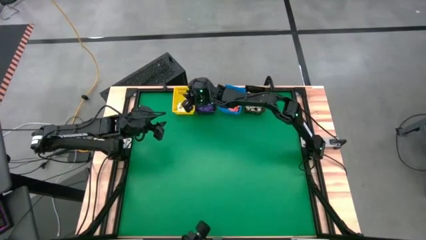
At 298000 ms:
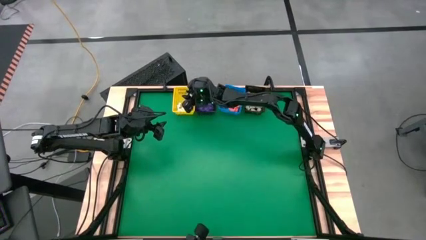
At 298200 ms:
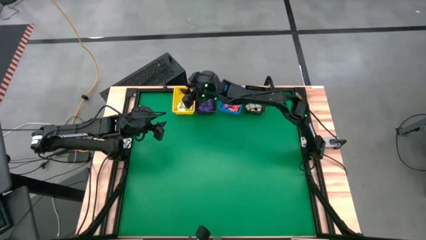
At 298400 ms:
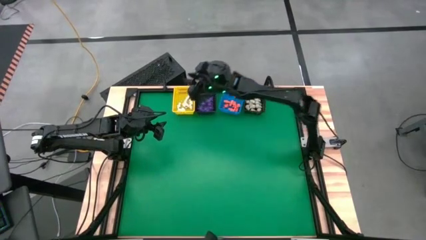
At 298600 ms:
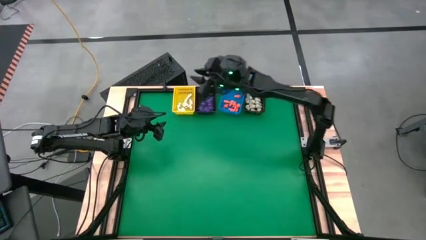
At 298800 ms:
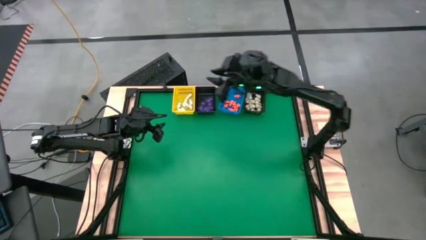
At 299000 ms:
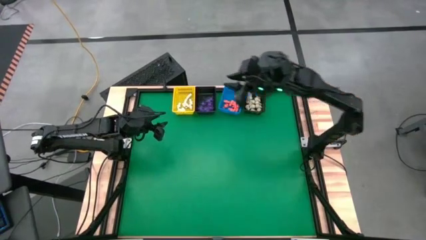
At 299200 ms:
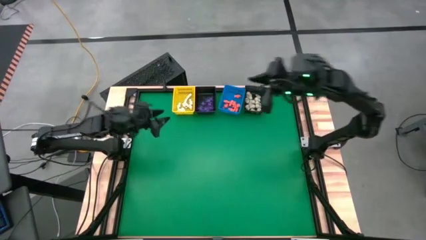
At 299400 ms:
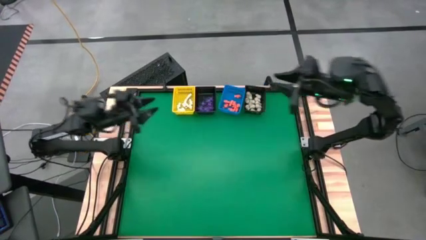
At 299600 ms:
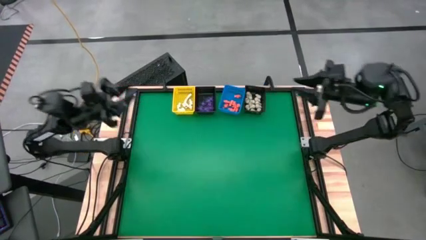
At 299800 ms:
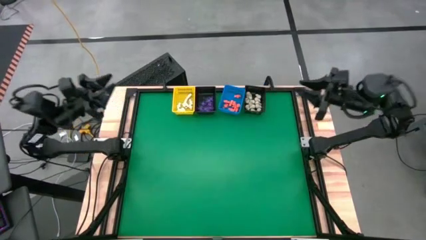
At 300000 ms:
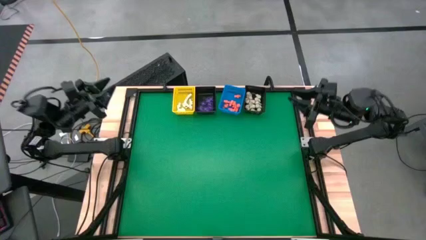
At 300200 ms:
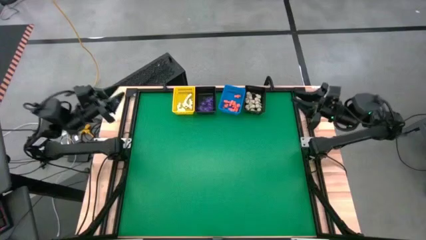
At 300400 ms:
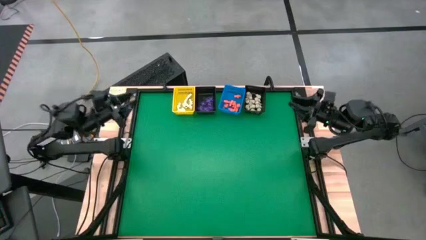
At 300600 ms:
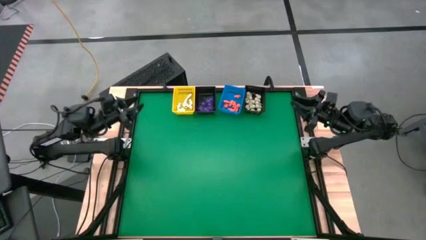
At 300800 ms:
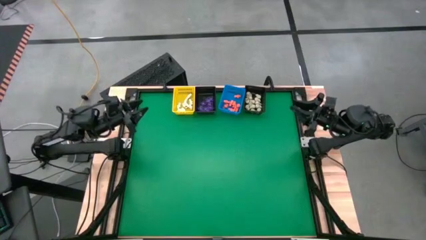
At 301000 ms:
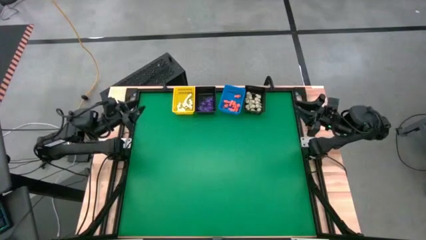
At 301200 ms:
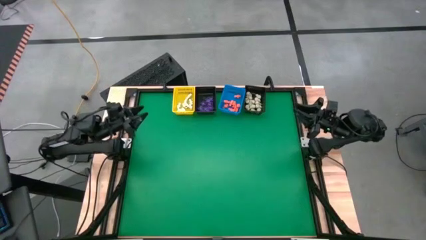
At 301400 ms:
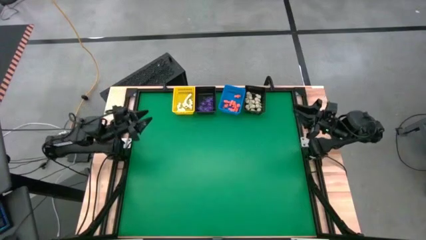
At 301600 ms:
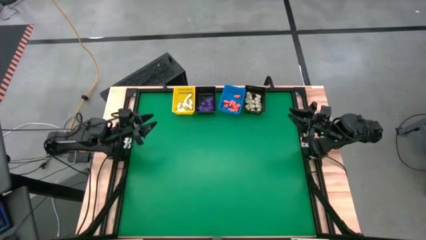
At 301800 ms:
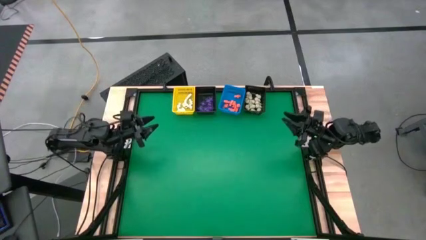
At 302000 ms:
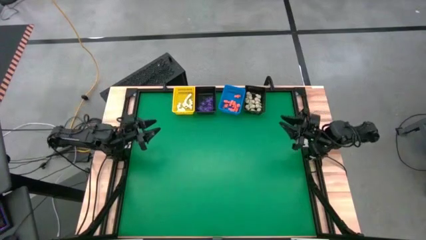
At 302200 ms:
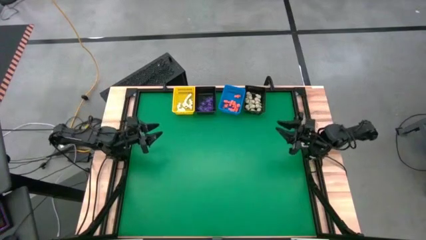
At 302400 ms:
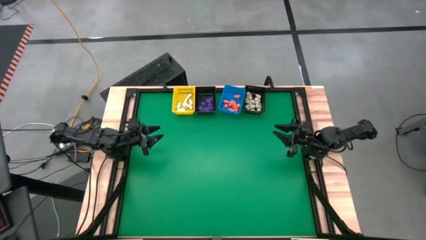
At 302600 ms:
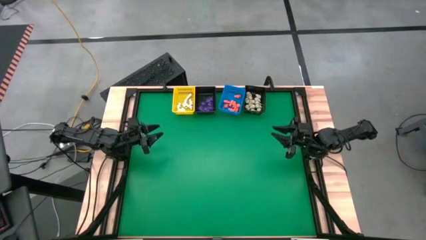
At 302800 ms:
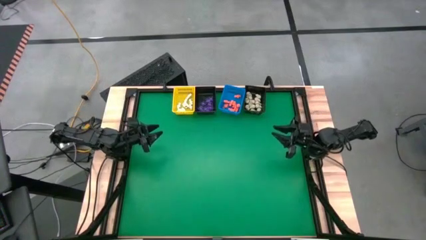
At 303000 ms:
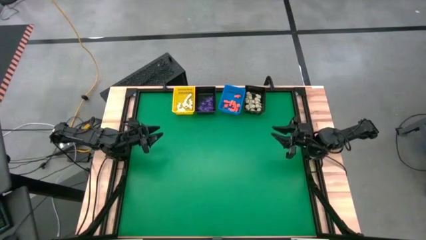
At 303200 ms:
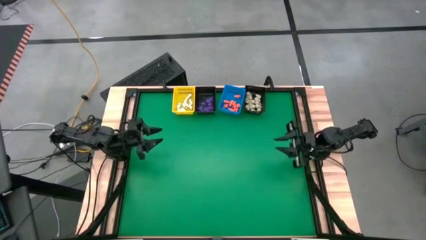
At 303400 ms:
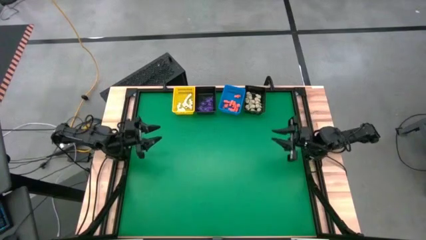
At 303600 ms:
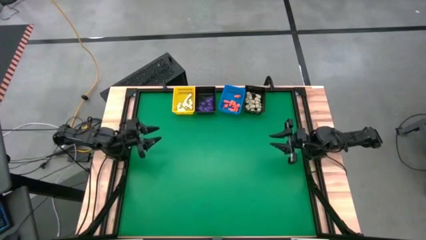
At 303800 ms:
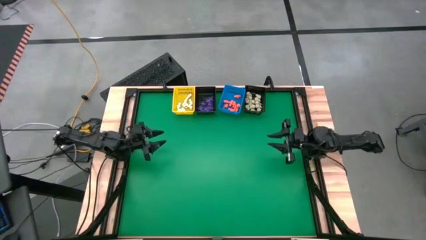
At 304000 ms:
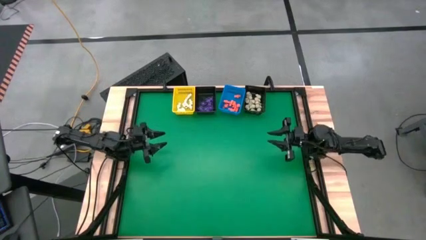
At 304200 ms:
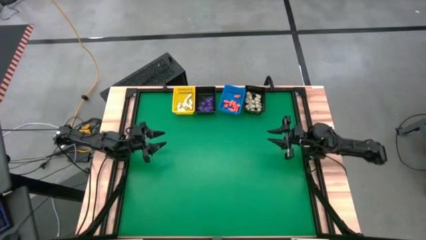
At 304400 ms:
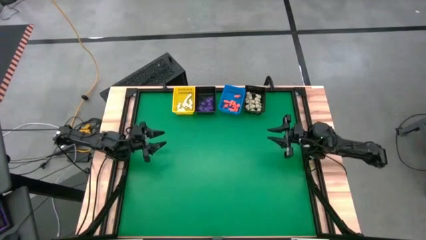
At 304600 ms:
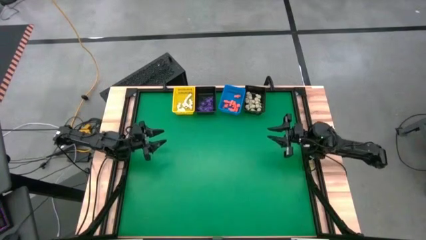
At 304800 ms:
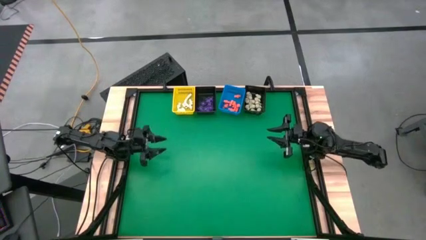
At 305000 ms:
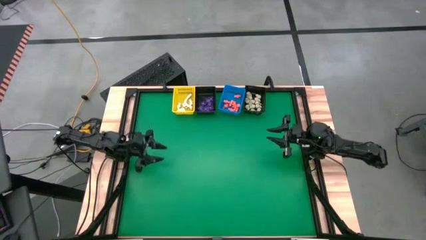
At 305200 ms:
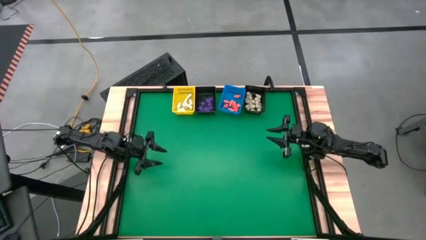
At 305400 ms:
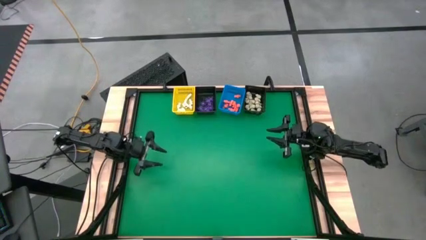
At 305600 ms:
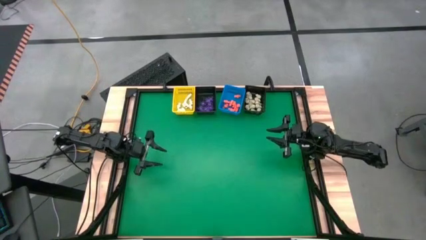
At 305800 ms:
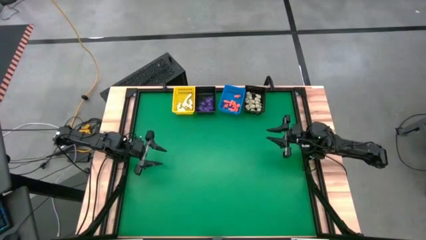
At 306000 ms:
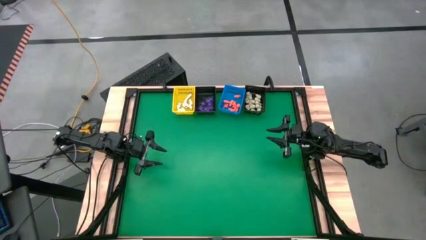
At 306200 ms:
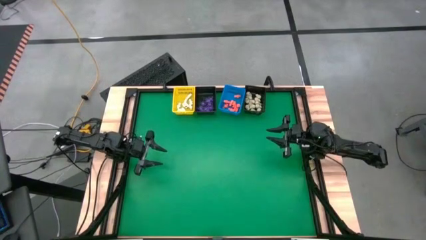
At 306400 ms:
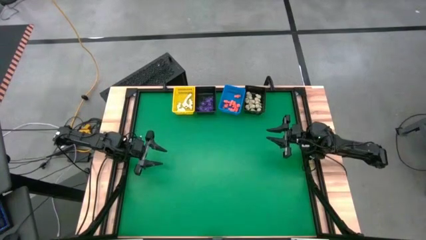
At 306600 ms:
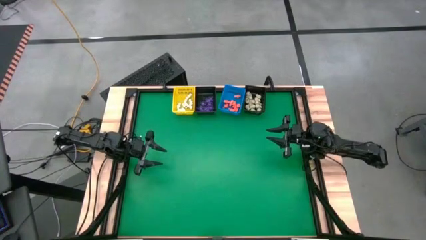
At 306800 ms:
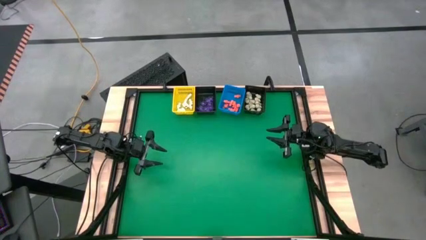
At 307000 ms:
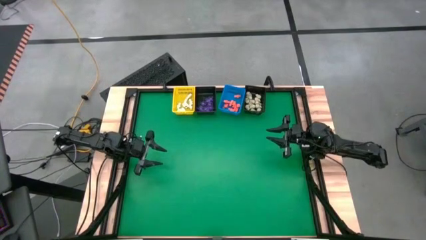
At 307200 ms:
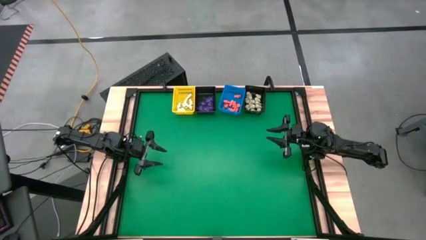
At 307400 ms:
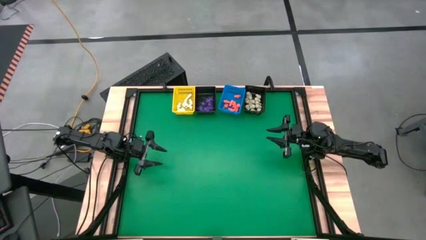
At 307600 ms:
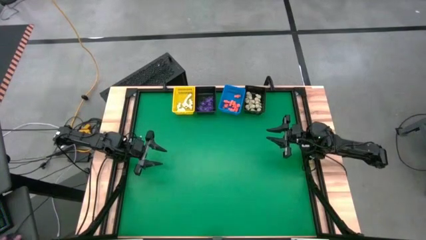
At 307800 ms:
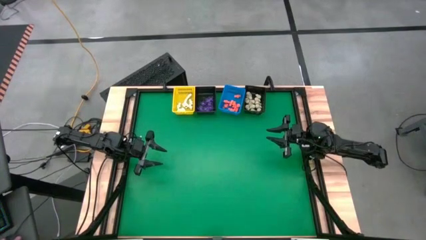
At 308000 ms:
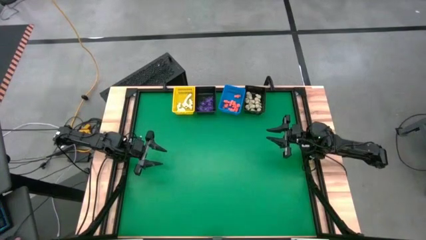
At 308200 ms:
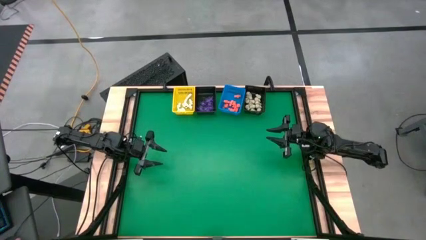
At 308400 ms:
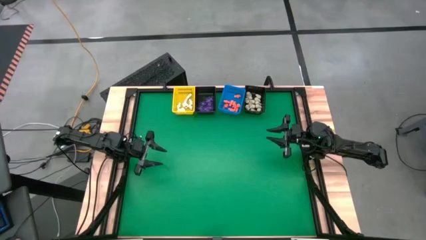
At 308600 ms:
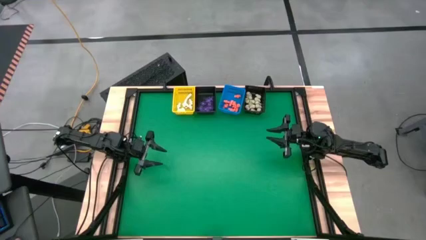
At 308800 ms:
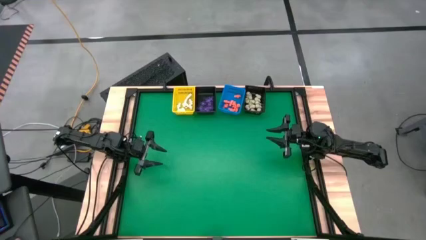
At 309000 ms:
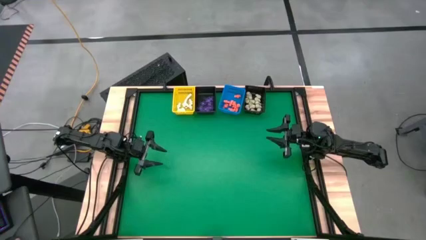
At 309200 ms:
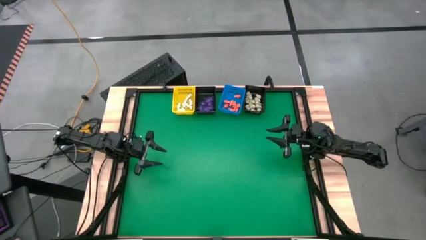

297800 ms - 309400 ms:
Task: Sort Halloween decoration
Return to Home Position

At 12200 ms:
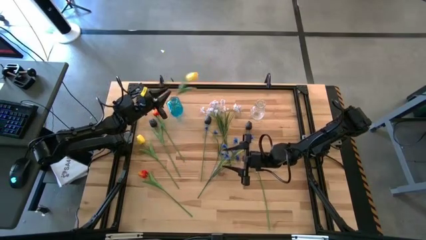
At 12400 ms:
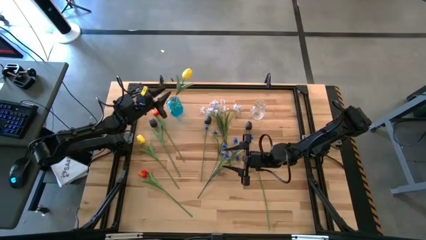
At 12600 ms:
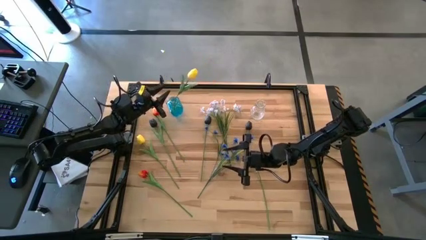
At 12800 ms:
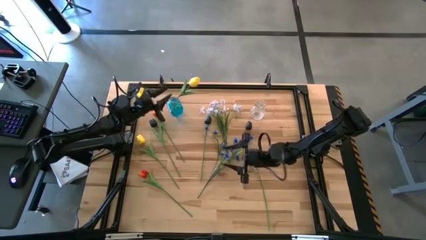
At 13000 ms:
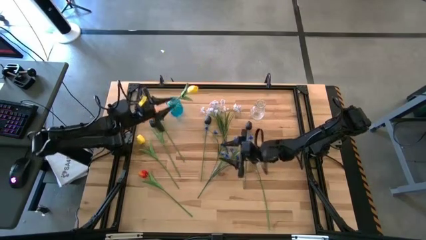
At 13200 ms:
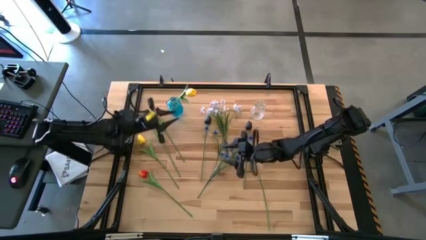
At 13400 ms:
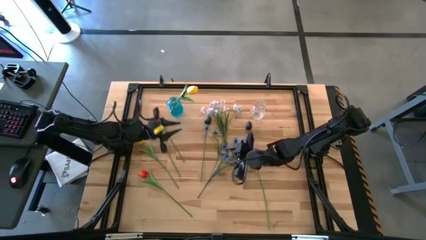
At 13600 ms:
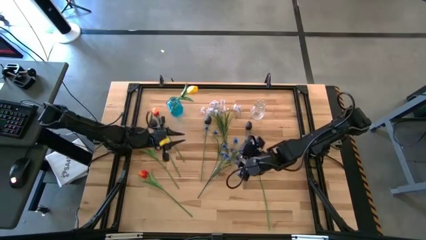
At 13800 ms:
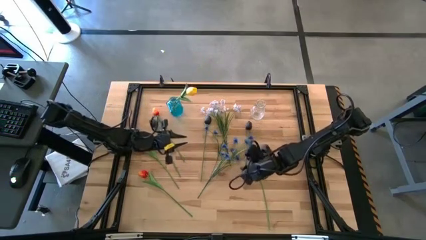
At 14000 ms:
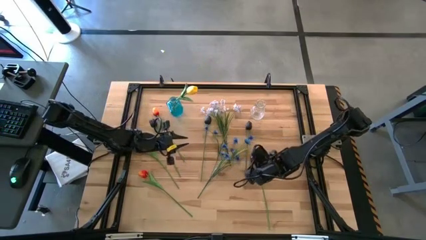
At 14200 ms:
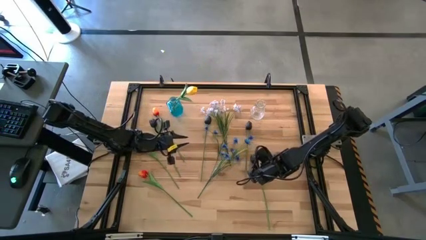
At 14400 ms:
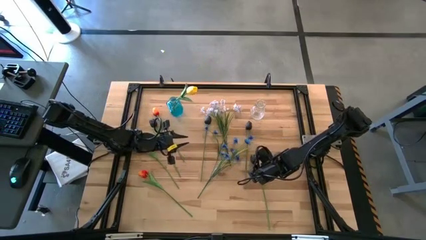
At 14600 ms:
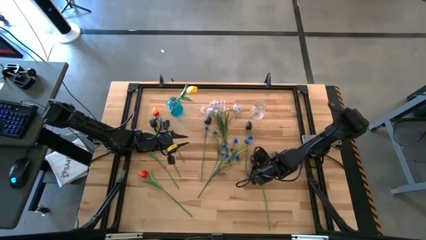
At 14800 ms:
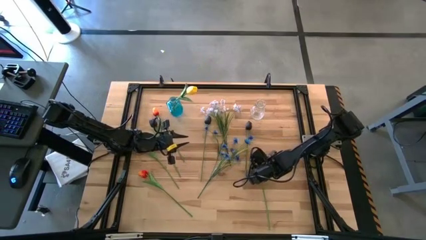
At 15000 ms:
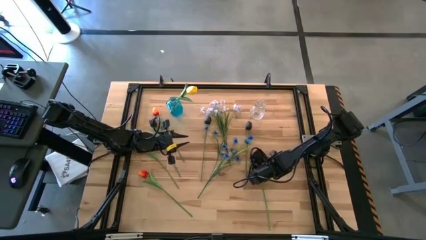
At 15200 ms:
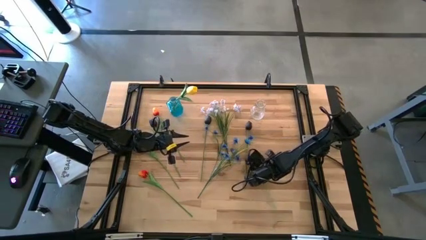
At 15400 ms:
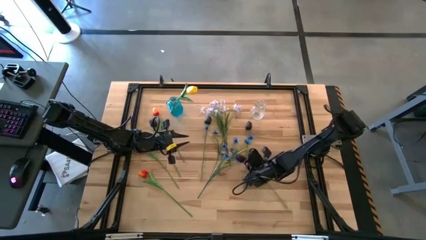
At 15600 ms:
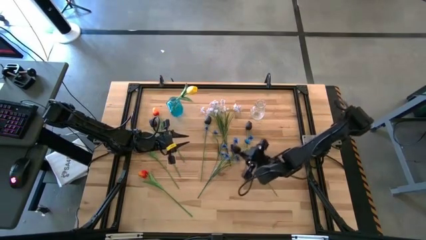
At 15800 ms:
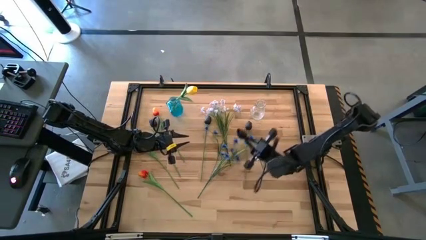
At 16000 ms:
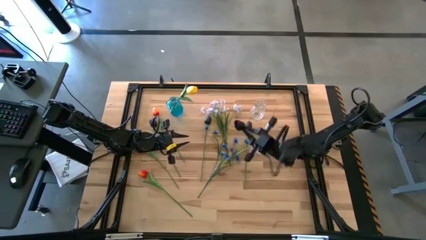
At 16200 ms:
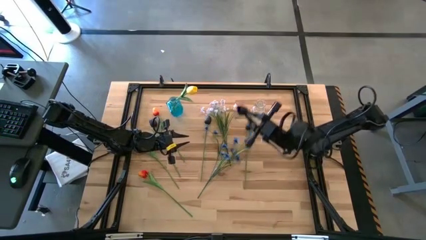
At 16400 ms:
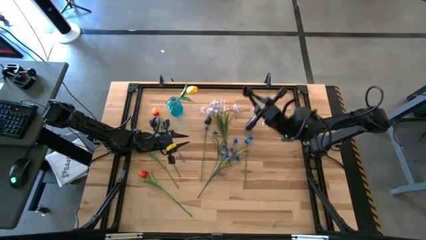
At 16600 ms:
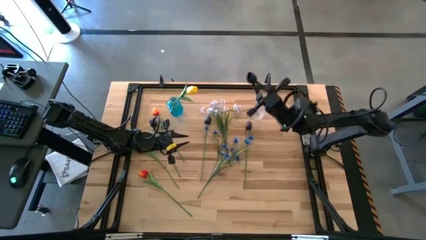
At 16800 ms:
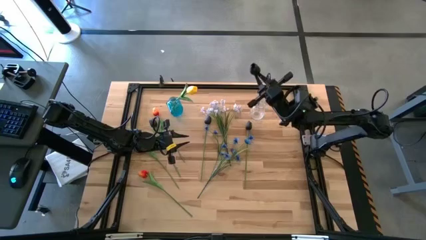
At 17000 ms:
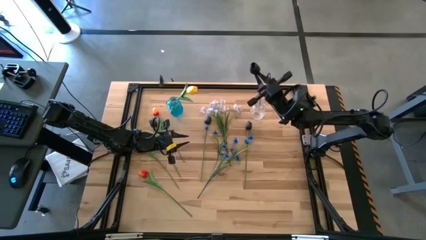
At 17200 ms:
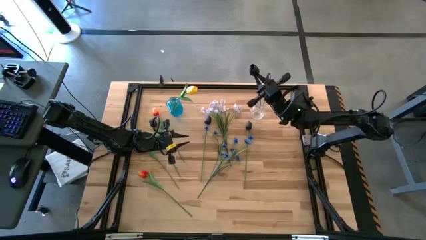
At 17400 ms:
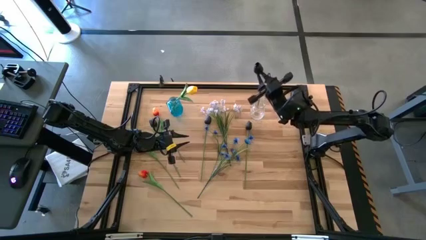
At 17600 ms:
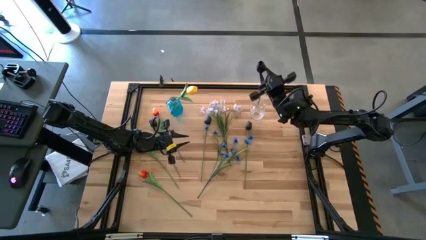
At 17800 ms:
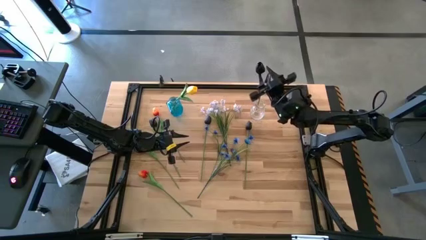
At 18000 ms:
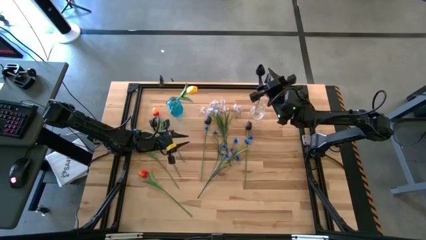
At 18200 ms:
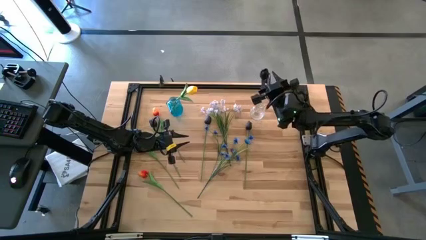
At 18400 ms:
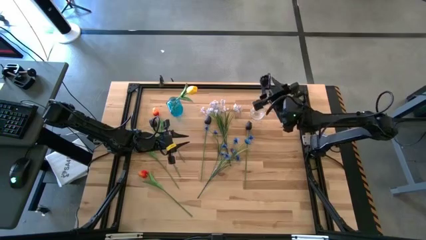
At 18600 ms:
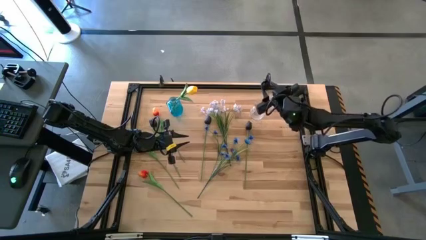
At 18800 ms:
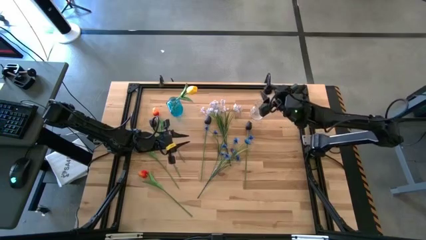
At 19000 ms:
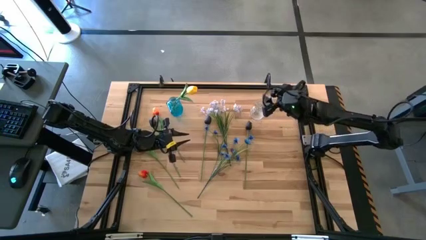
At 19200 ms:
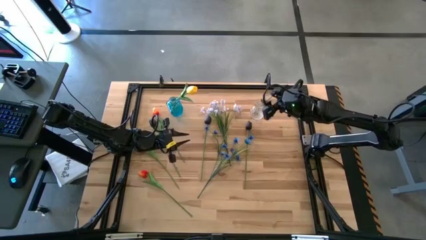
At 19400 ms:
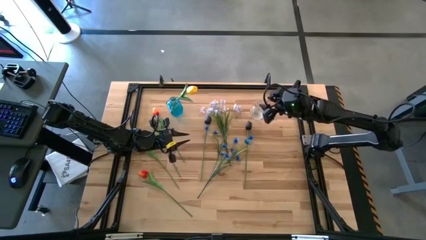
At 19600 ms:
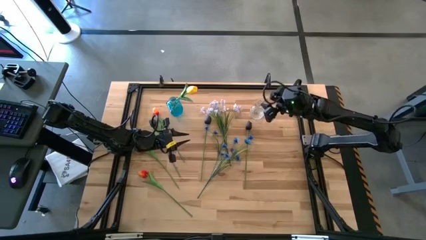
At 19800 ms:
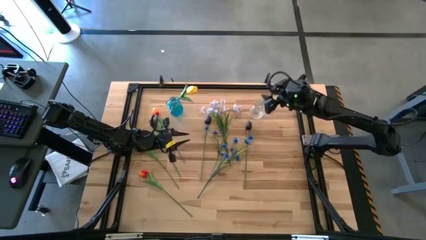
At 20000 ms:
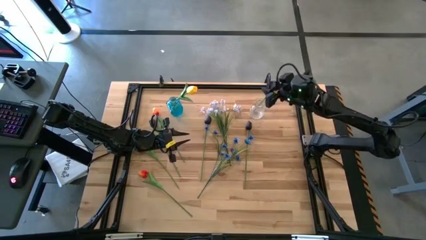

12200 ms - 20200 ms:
Task: Sort flowers into vase by color
Put the black flower into the transparent vase
